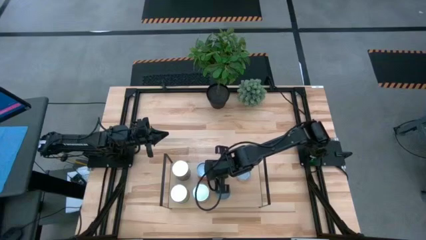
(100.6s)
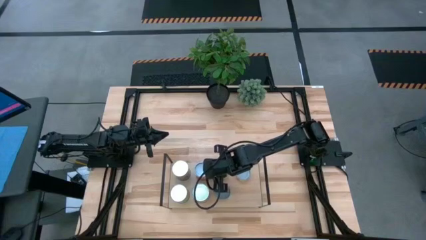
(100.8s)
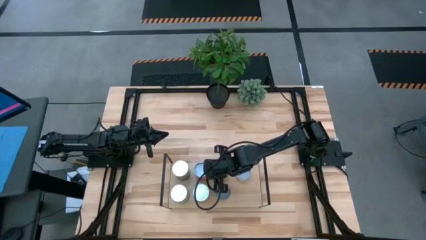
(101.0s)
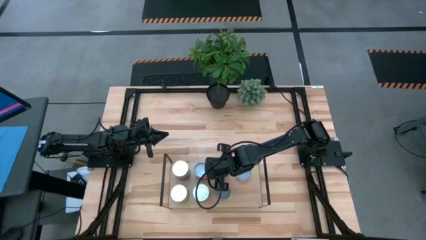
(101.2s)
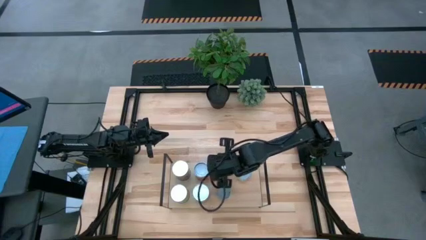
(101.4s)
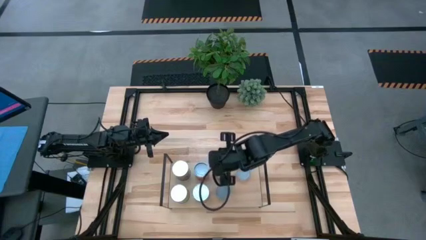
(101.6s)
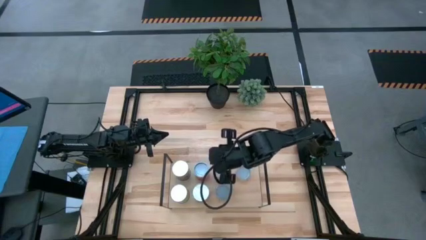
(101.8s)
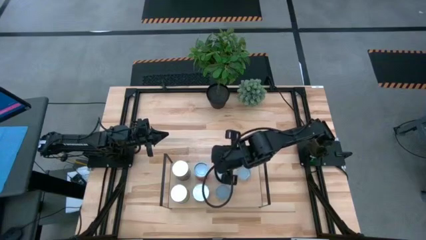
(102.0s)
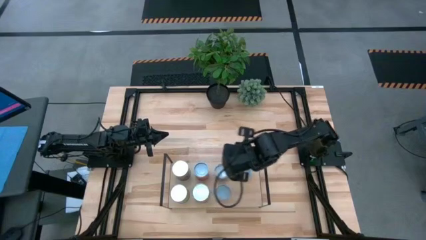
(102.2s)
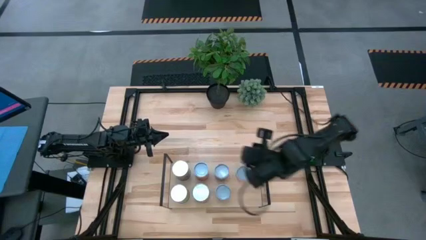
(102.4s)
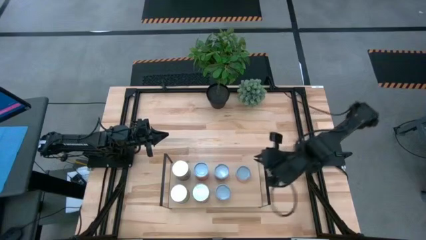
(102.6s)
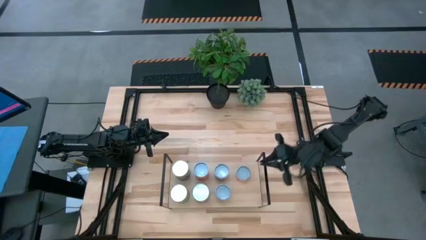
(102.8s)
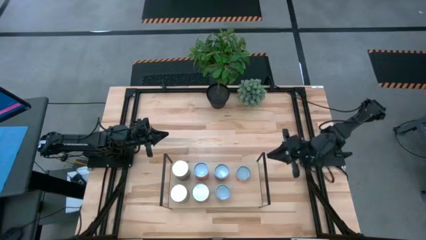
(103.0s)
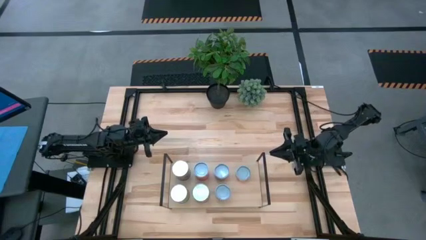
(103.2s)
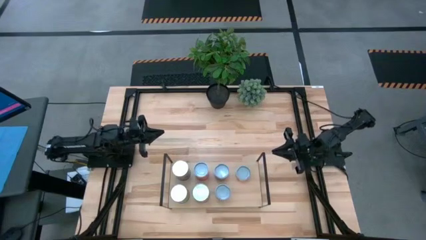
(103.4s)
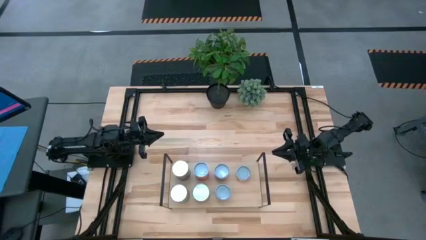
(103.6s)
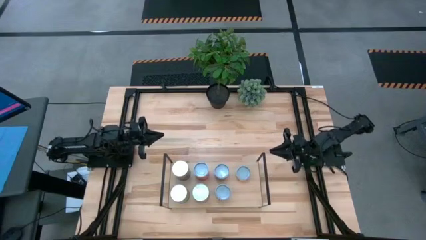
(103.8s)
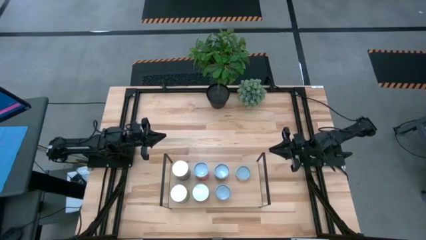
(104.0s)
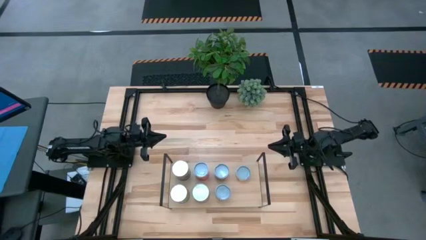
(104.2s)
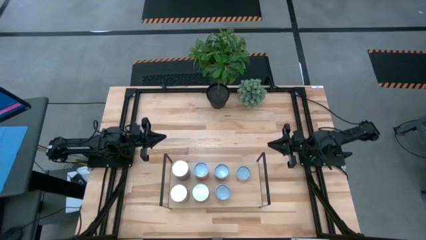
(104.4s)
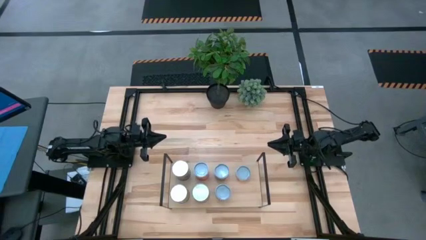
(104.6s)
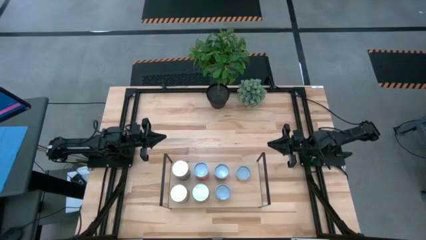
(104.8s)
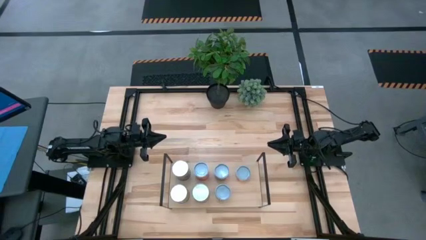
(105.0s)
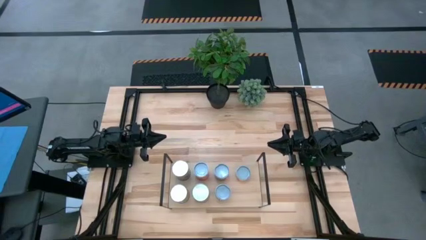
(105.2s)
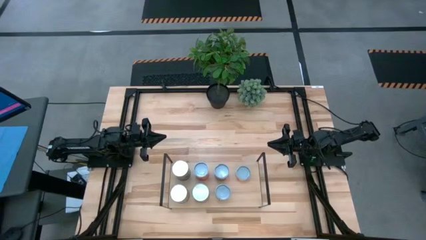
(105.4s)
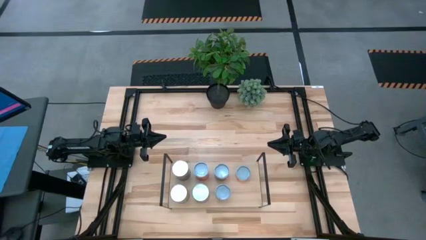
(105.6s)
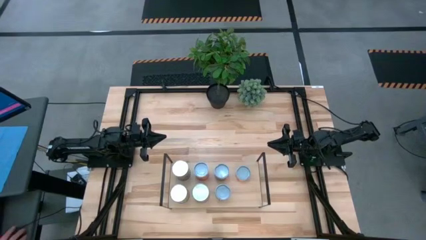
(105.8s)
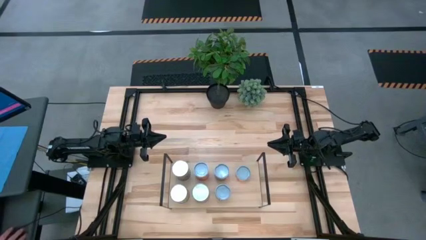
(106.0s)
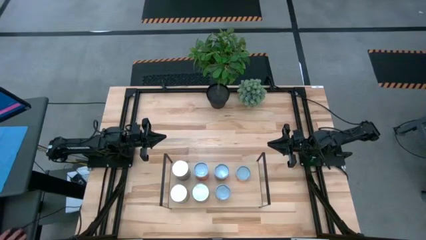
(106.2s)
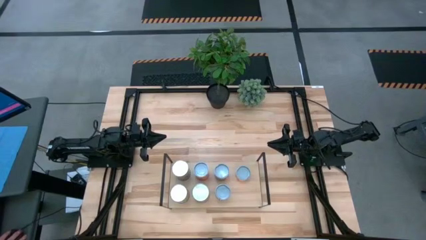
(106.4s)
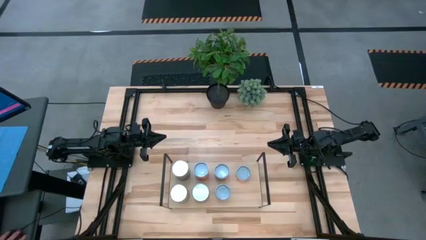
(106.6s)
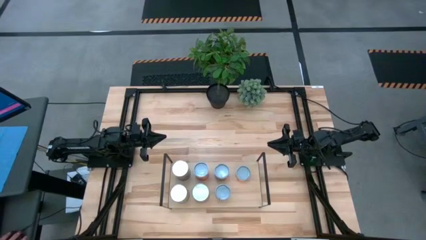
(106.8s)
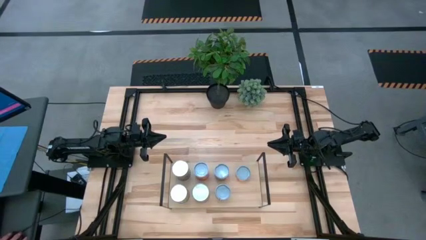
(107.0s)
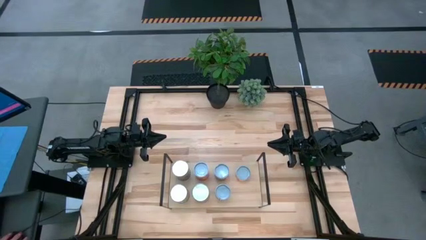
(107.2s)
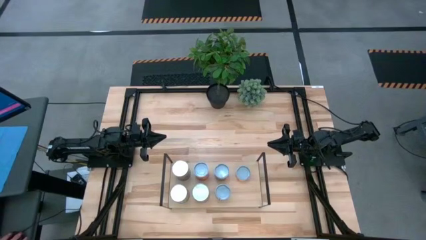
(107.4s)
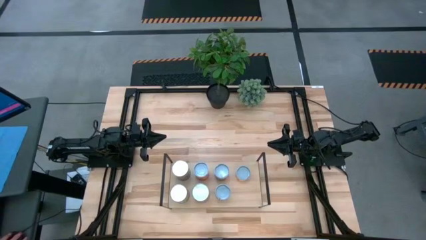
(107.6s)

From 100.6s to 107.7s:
Task: Pick and place cans onto a shelf
Return to Home Position

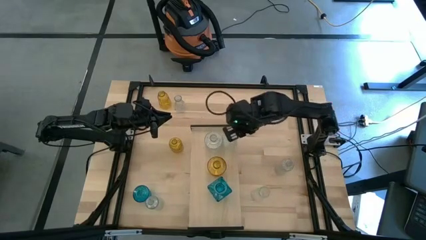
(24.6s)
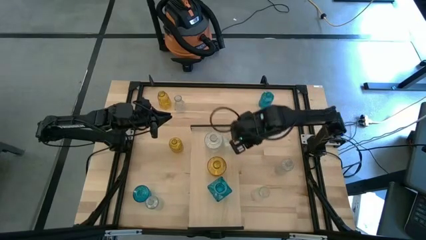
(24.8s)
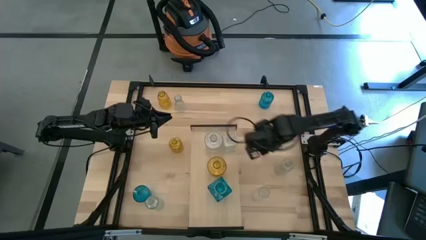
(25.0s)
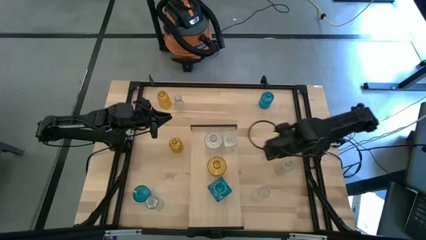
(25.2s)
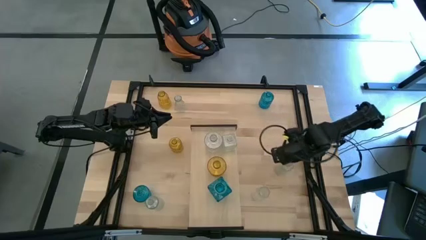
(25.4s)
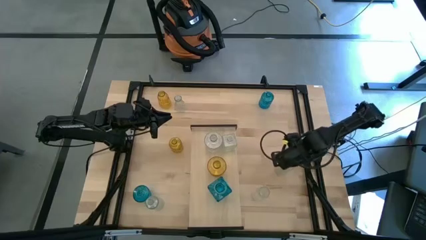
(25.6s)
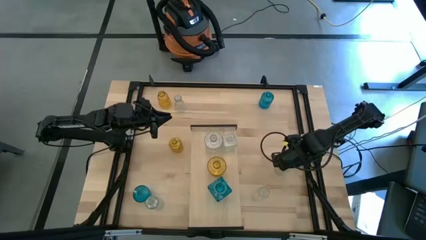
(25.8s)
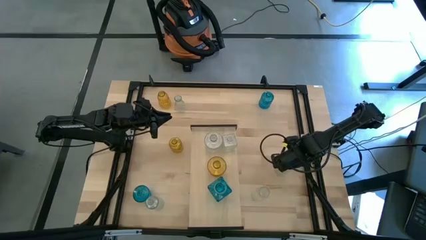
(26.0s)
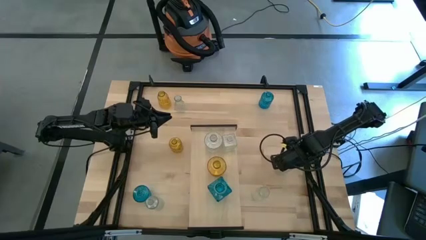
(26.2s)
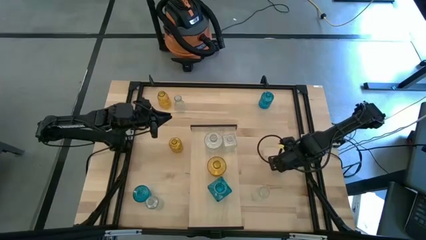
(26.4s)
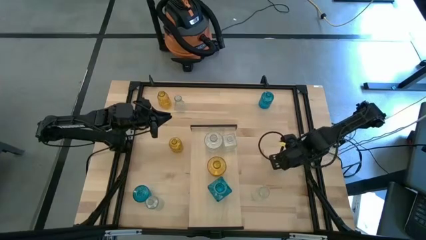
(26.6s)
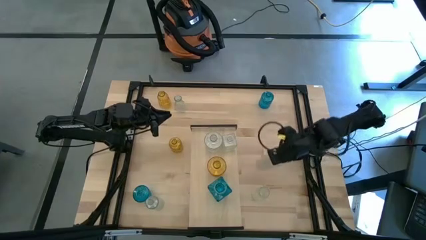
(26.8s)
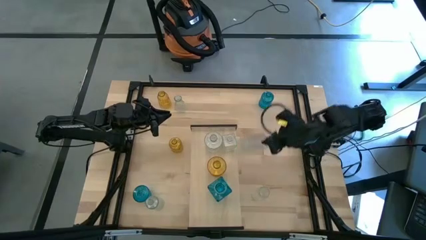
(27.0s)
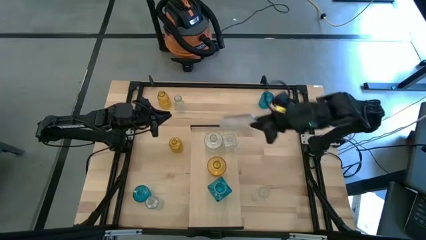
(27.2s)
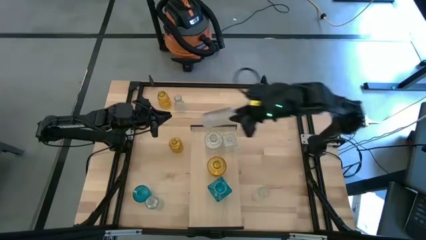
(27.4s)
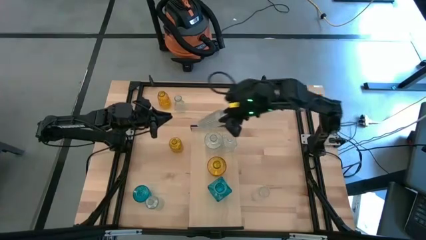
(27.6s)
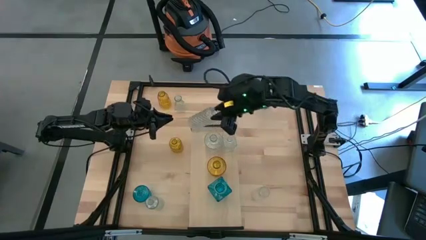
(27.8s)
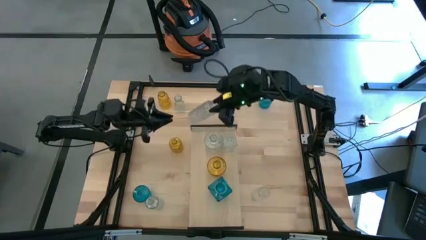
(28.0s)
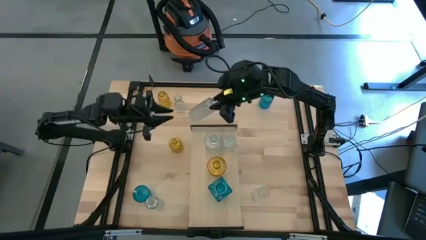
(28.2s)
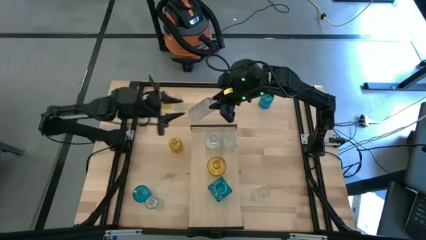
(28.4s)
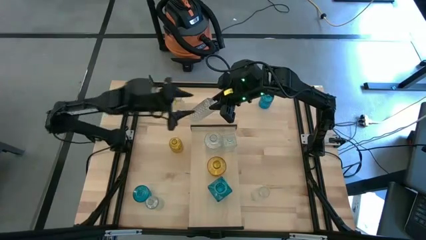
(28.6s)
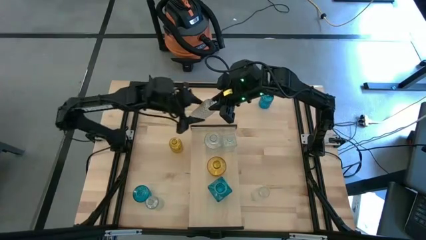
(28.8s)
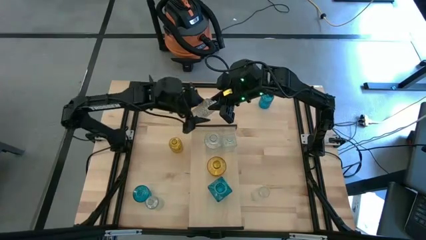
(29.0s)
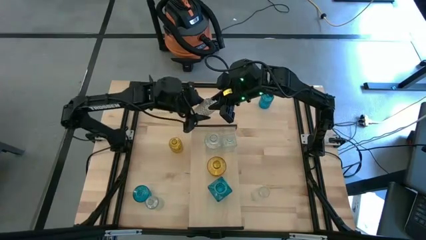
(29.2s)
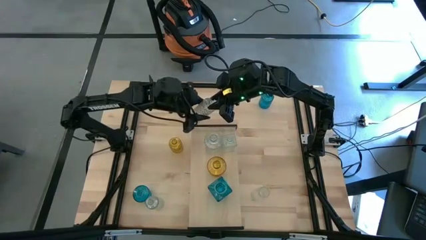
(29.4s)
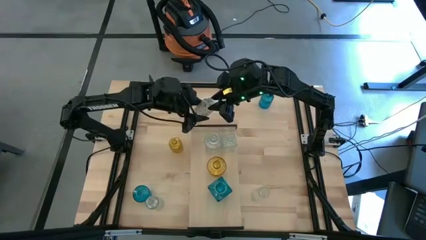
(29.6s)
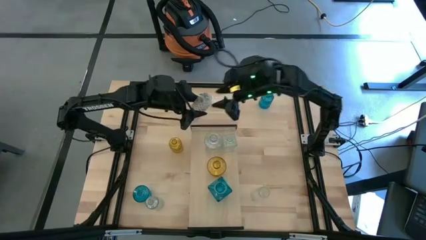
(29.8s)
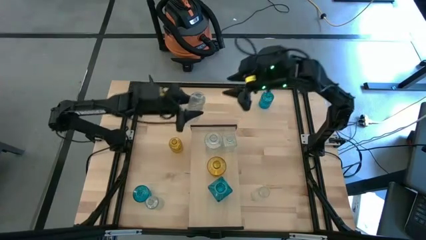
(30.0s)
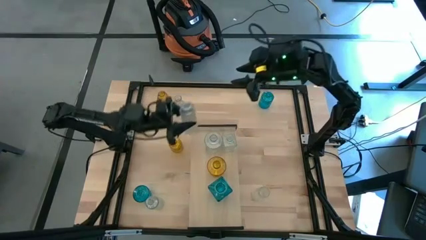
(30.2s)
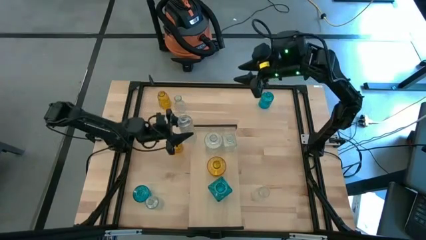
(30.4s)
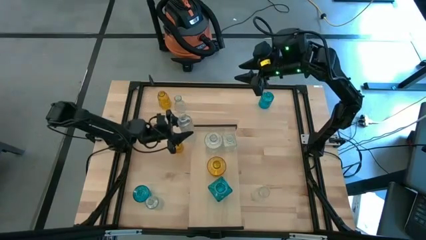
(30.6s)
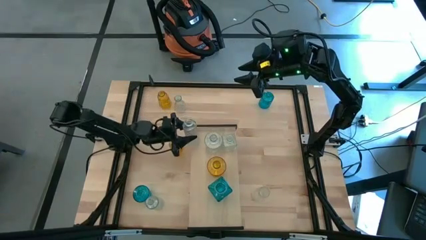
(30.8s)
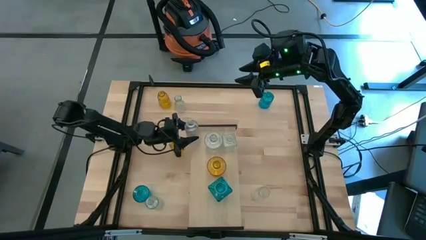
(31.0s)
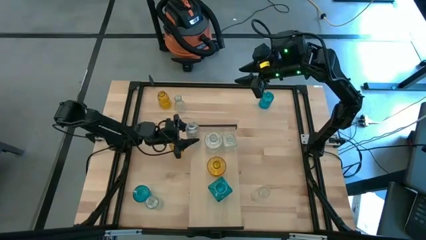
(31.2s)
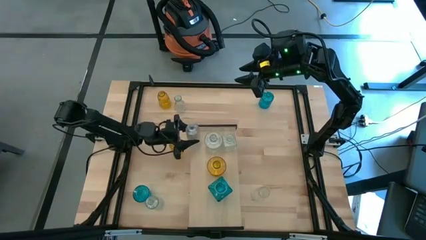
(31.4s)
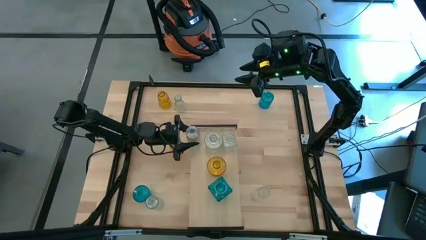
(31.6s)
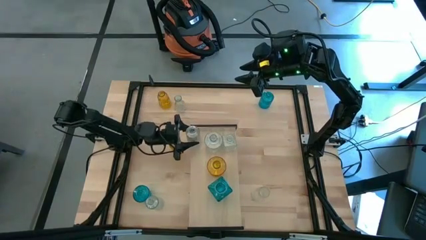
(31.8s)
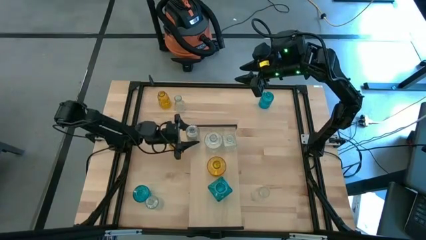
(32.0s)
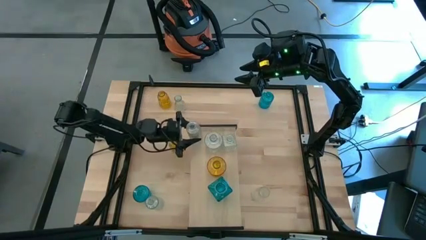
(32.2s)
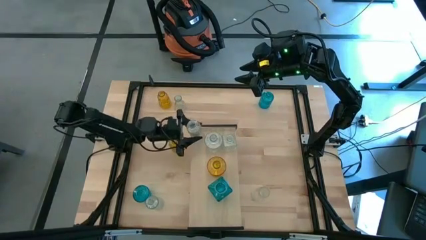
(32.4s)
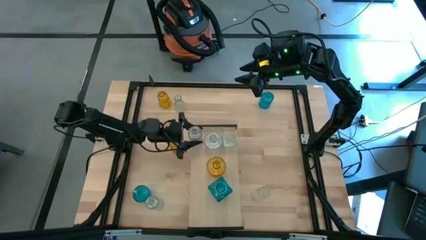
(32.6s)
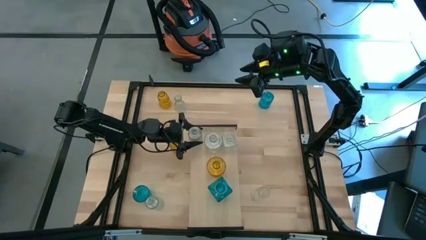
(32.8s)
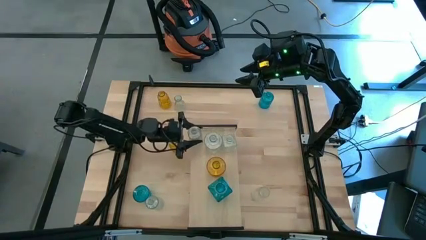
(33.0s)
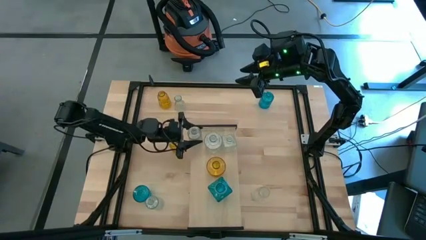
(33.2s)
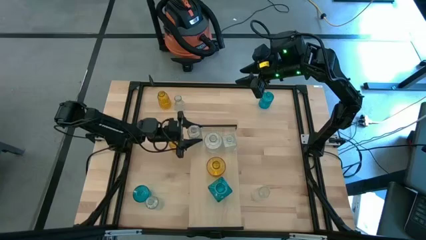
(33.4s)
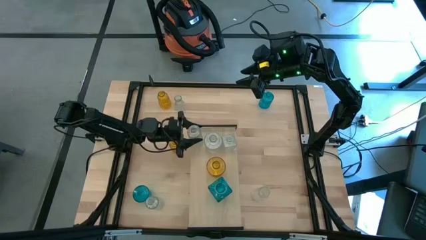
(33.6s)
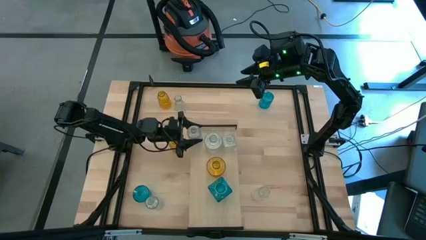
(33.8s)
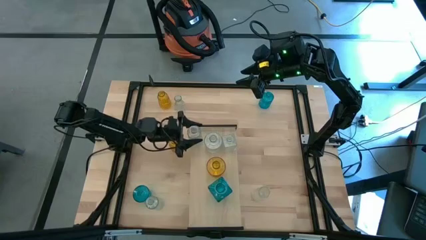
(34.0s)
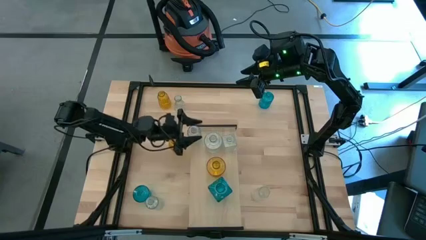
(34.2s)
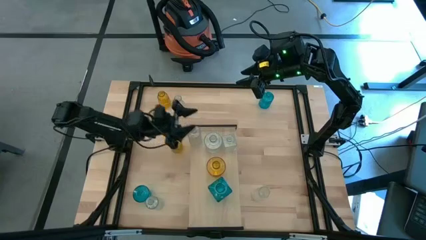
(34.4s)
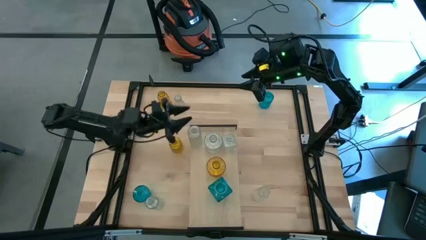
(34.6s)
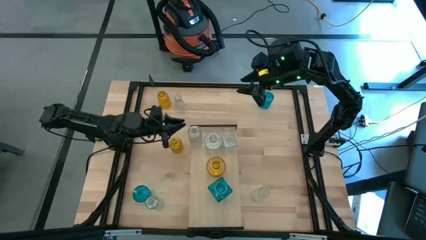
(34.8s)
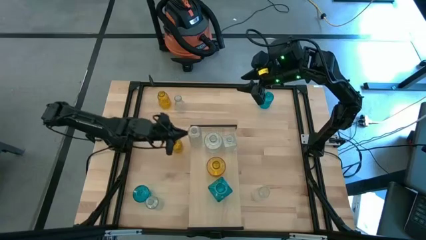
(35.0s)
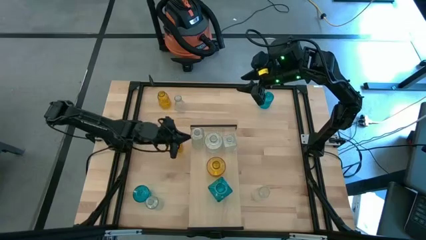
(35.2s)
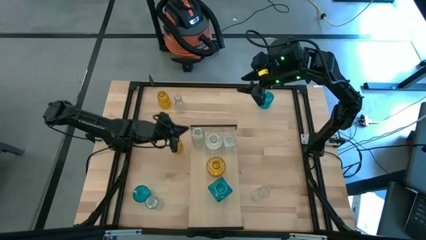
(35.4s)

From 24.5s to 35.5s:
Task: sort vases onto shelf
Put the transparent vase on the shelf aligned with the other transparent vases
